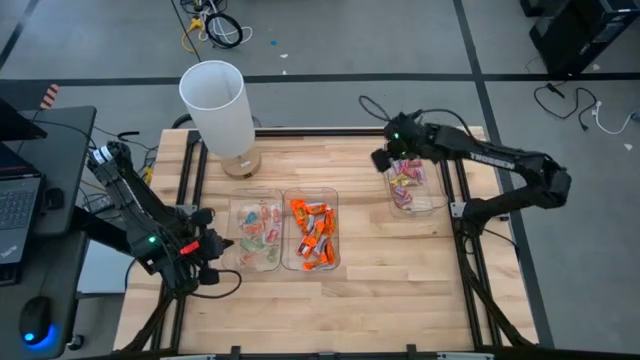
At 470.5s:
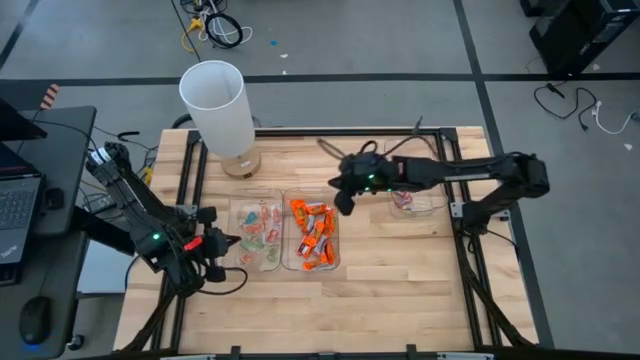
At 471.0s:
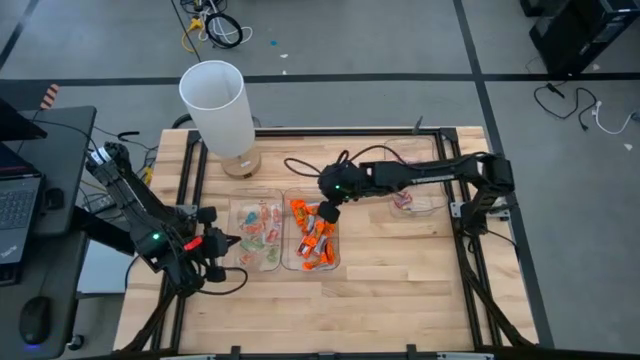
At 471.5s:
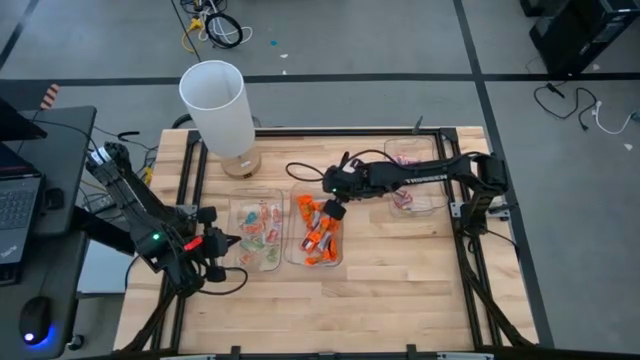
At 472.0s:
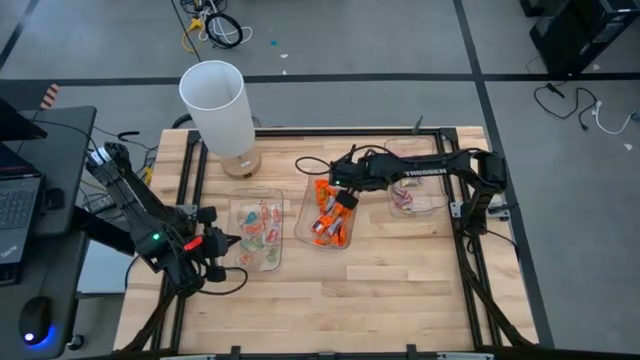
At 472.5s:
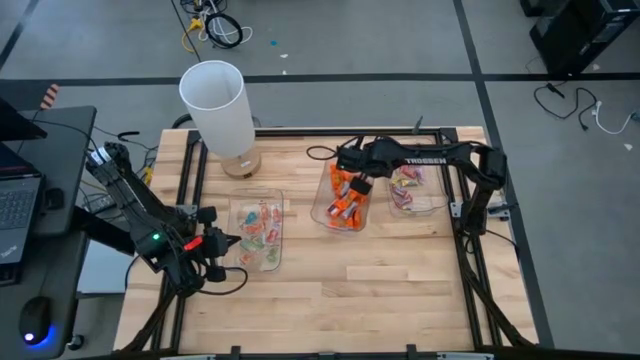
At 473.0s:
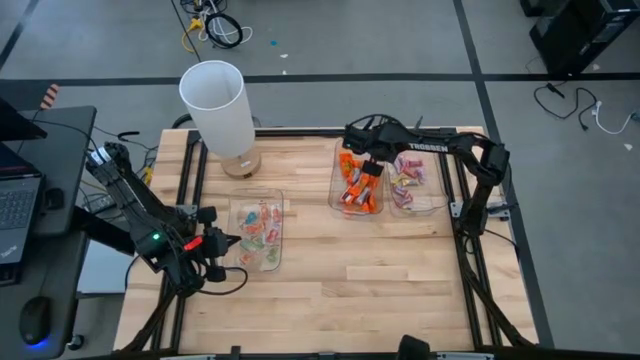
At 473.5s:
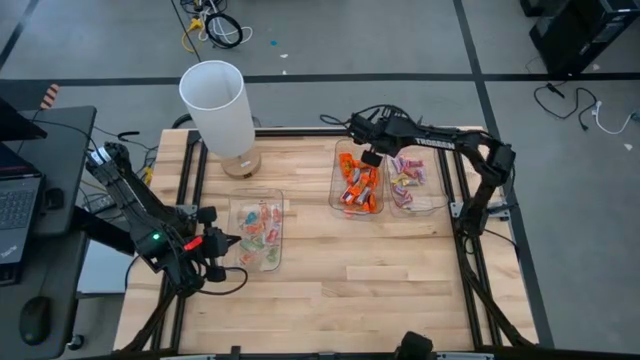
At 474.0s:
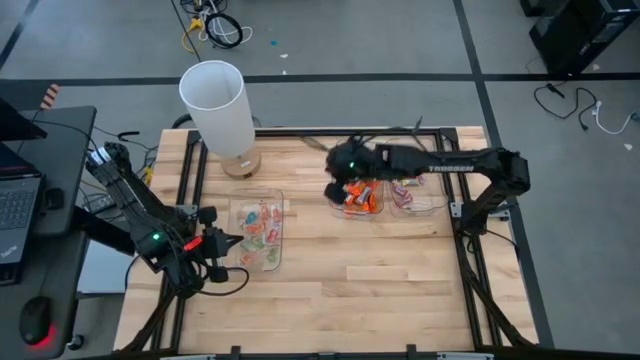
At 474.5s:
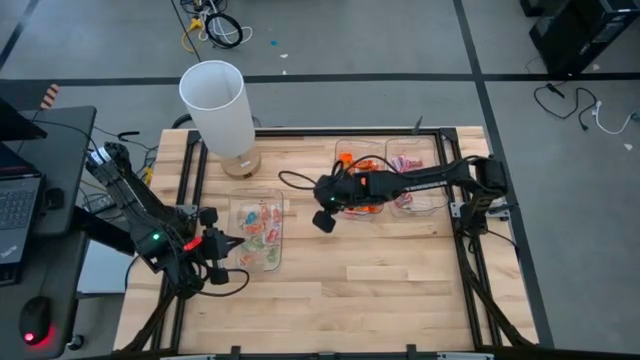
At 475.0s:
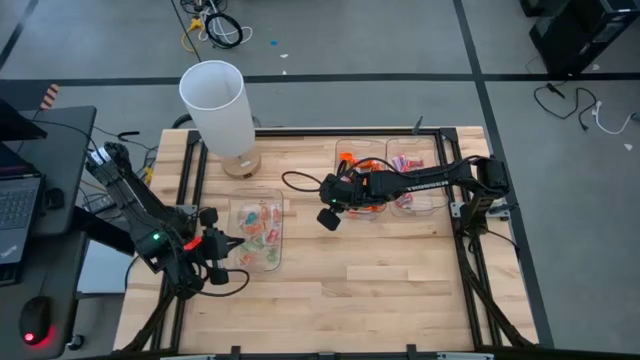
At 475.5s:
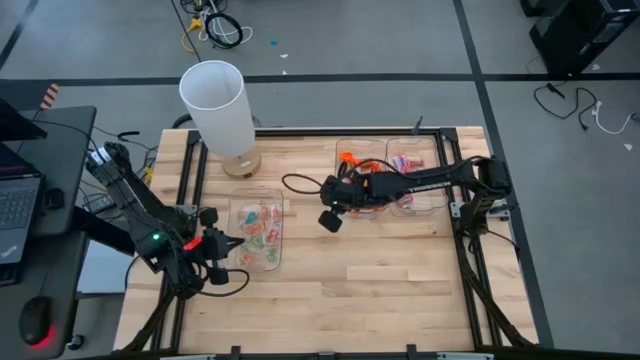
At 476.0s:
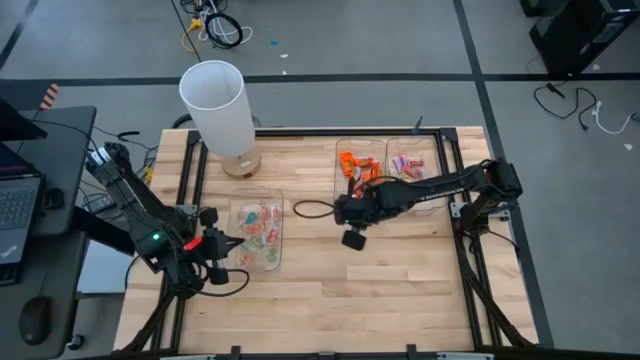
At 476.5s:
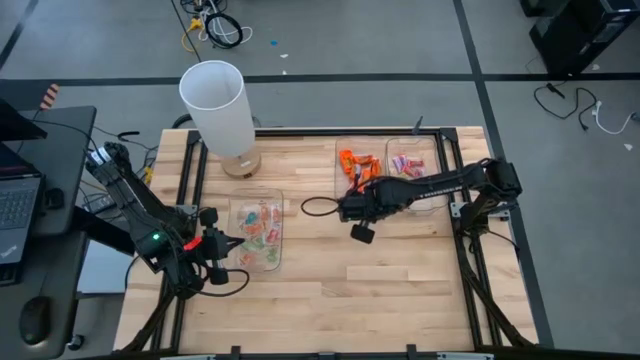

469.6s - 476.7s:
Task: Sort candy
Move the center transparent bin to the top middle of the table

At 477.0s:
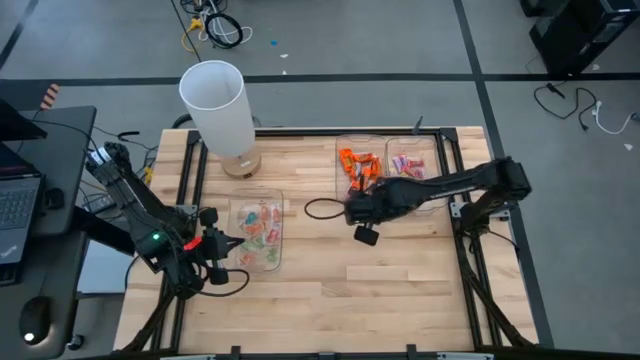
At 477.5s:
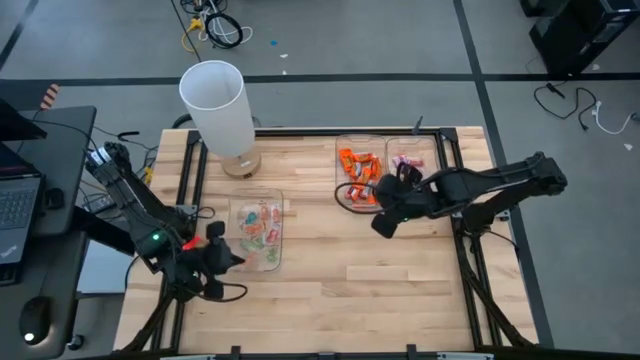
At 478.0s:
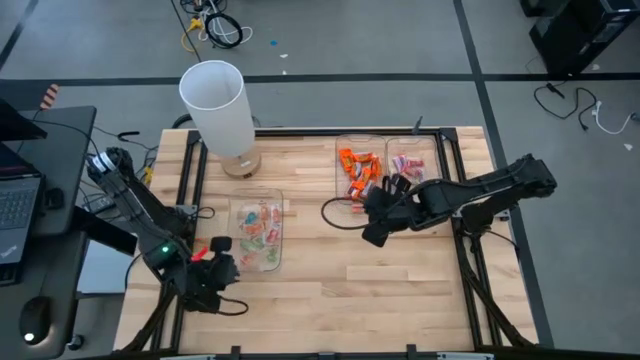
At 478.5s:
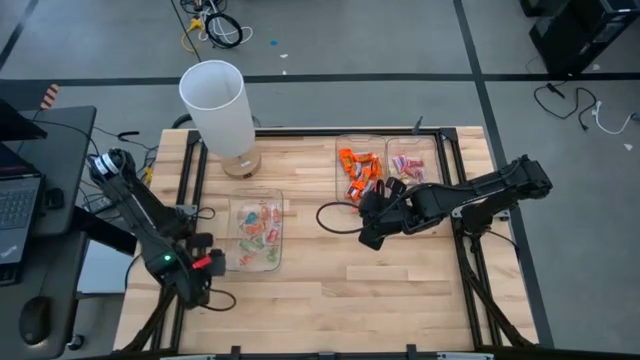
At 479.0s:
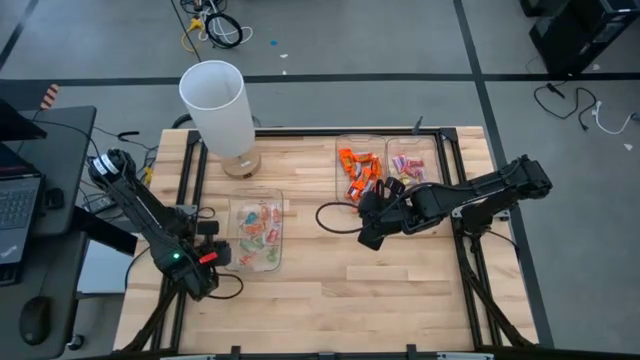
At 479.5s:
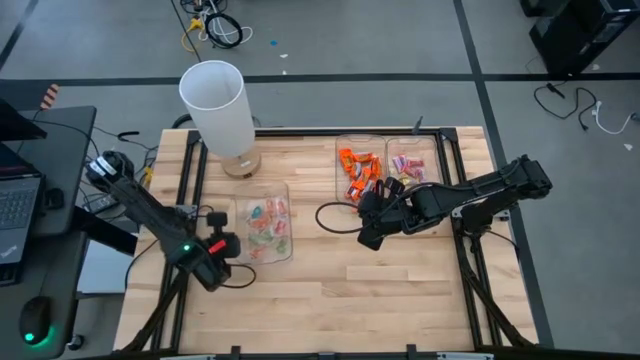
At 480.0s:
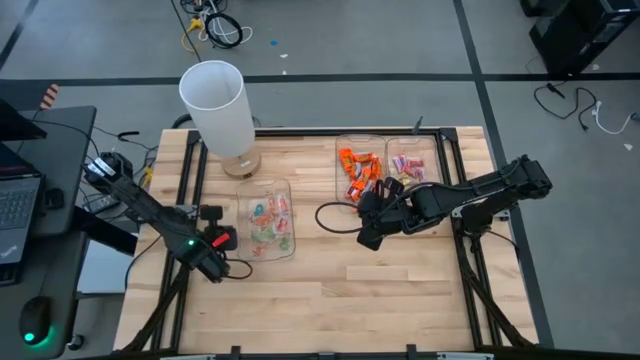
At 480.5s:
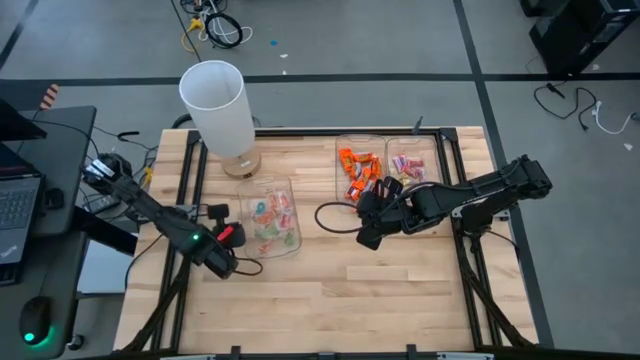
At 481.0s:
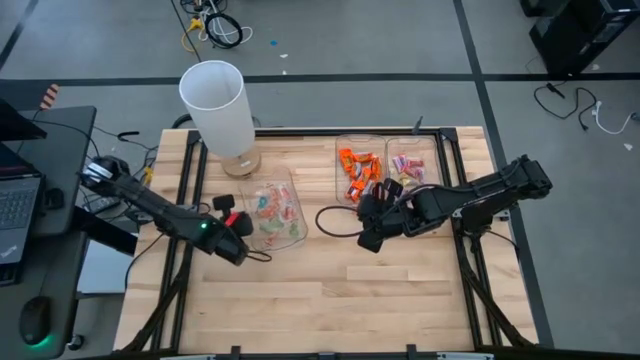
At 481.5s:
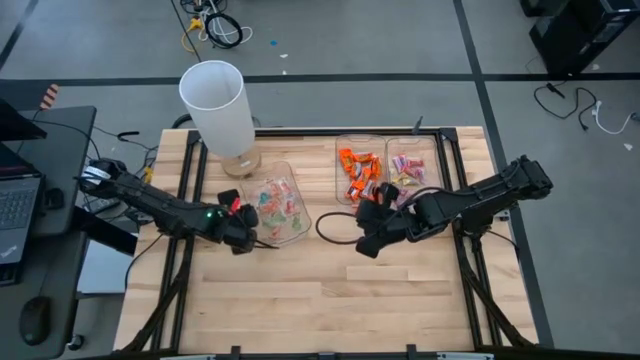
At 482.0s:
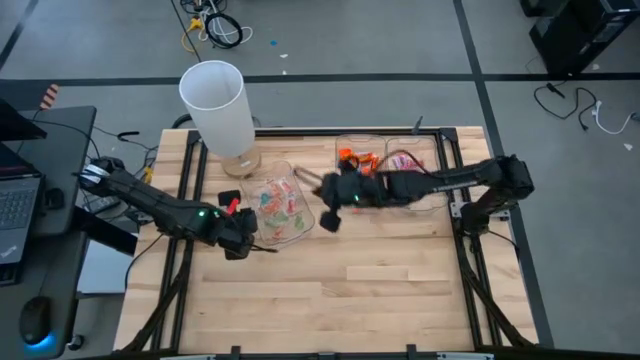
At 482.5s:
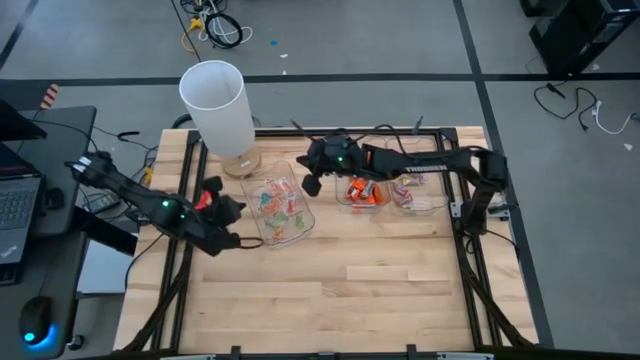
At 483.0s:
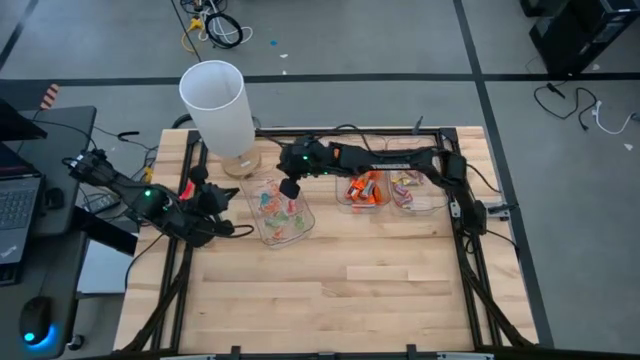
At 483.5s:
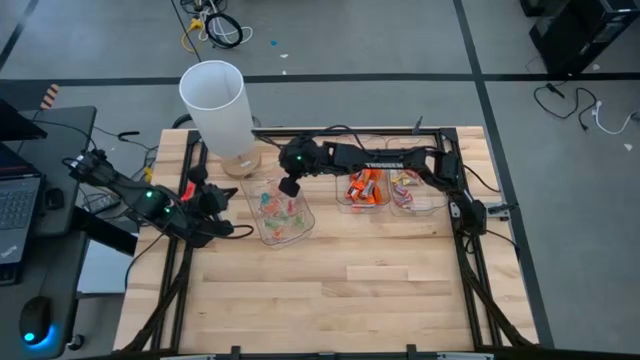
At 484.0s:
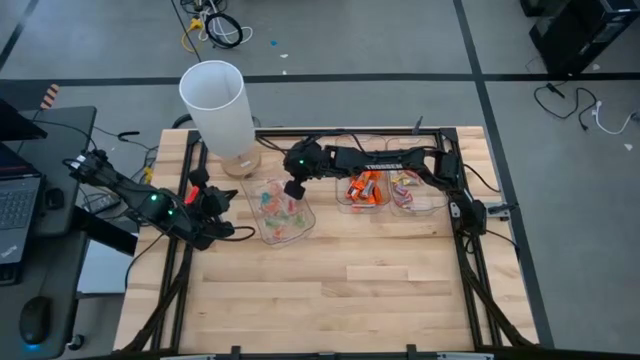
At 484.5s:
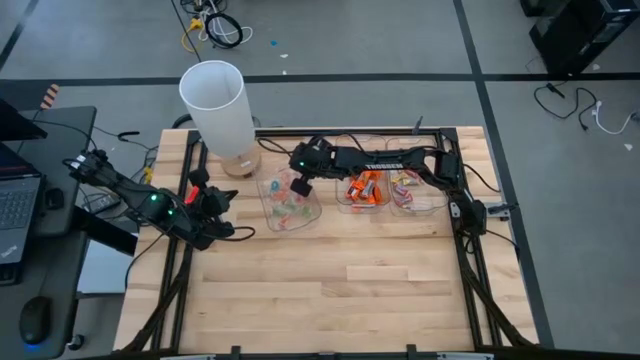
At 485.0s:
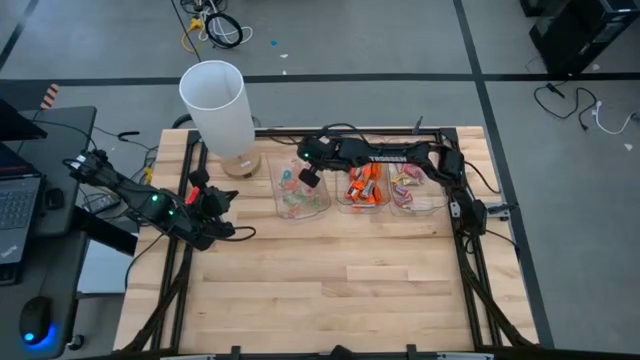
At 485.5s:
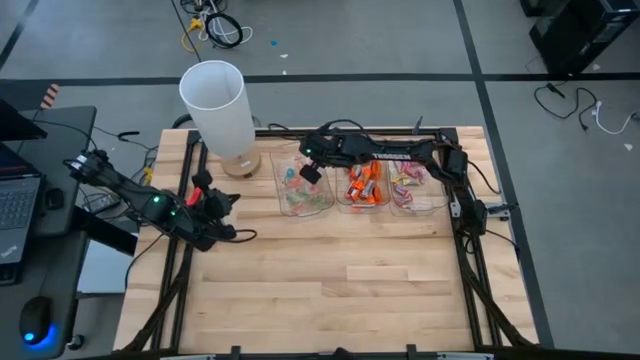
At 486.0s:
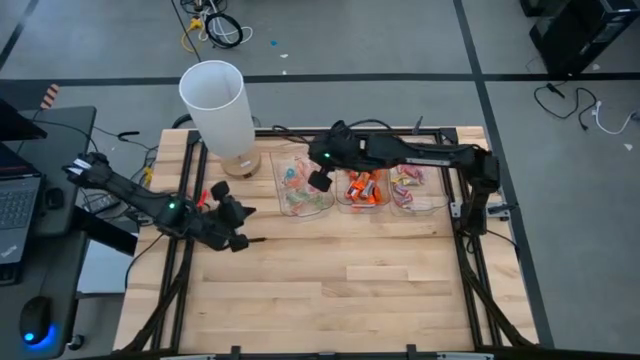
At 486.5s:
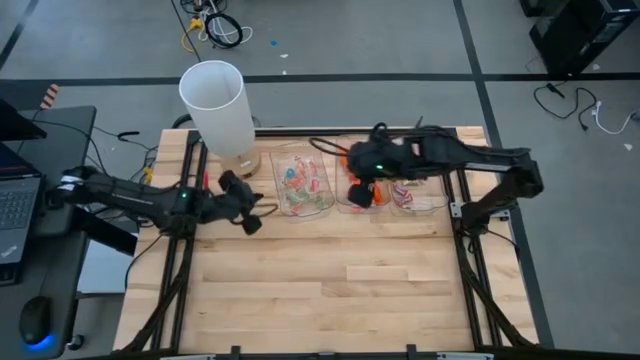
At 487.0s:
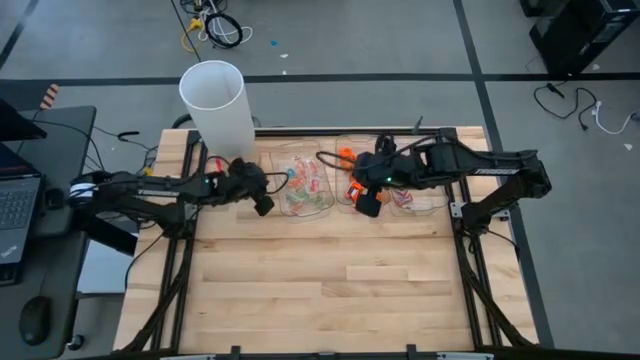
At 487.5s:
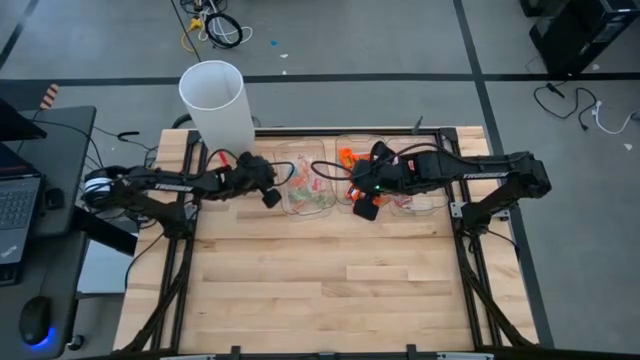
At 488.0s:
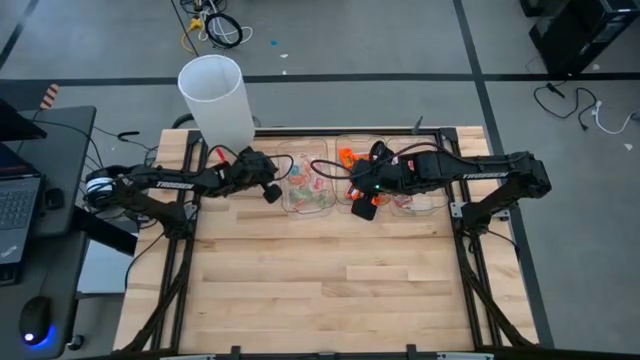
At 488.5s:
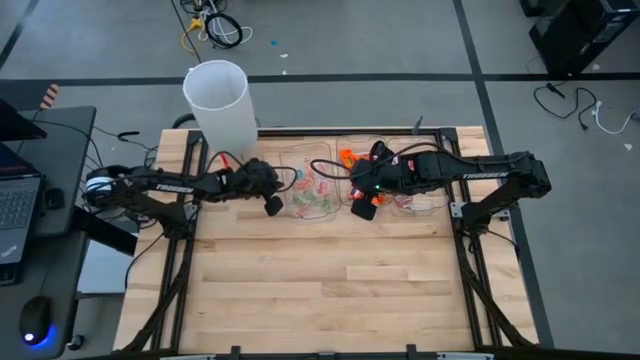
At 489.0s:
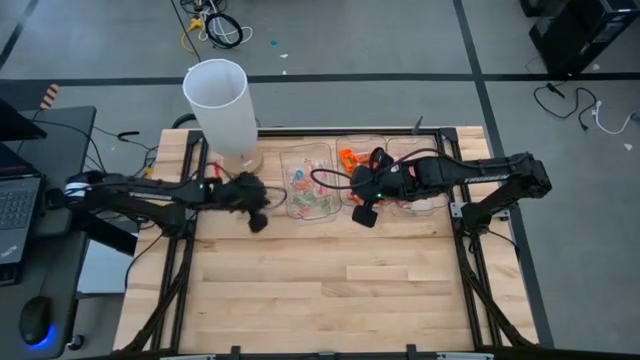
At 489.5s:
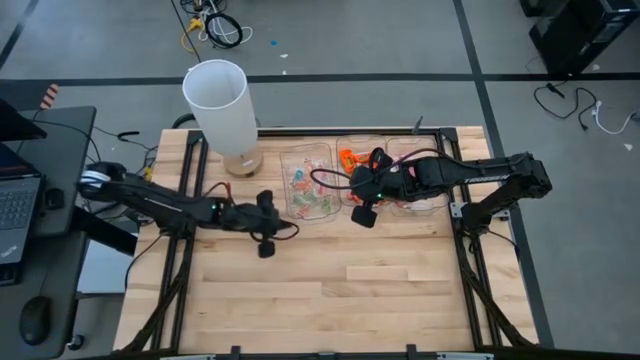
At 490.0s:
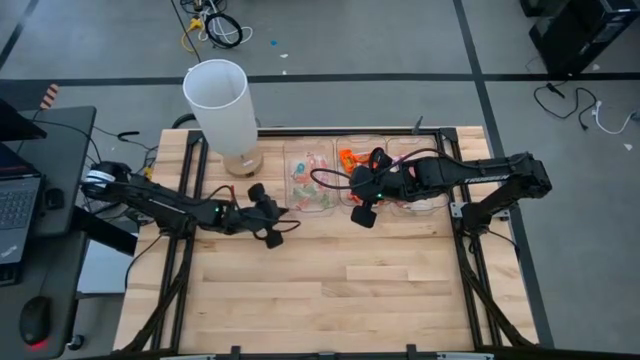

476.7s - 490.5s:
Move the middle left transparent bin to the top left of the table

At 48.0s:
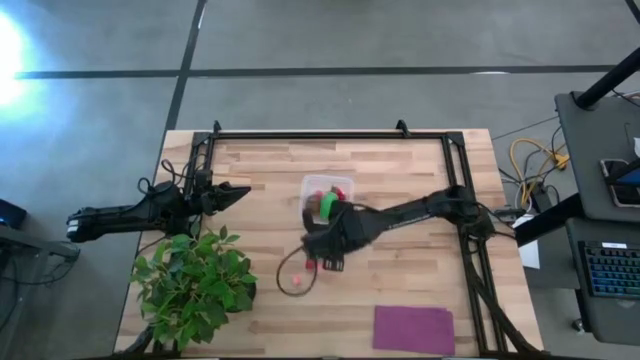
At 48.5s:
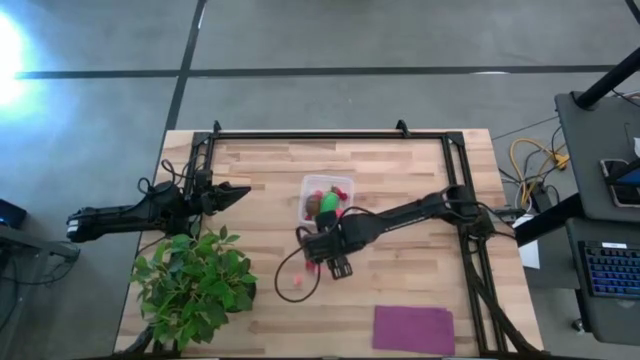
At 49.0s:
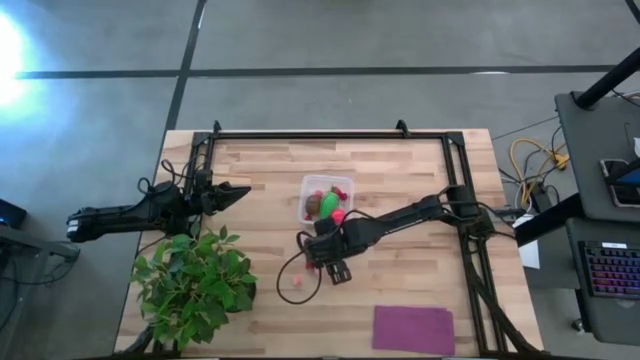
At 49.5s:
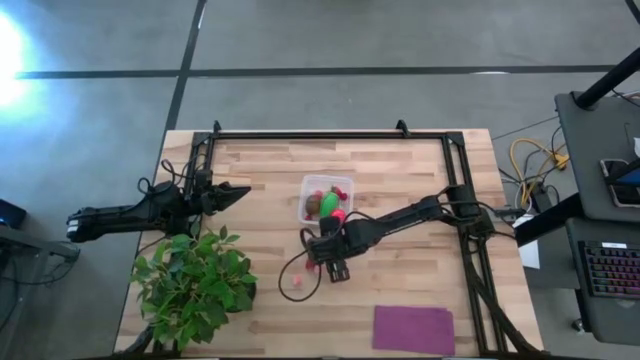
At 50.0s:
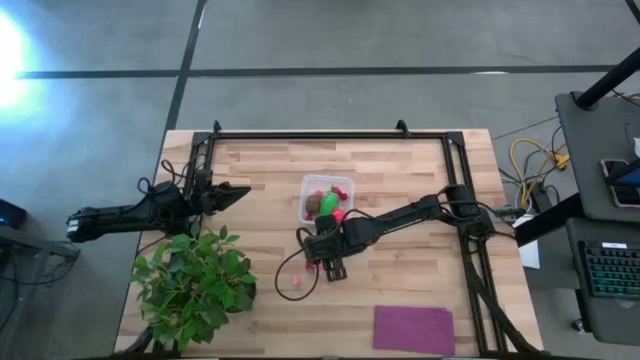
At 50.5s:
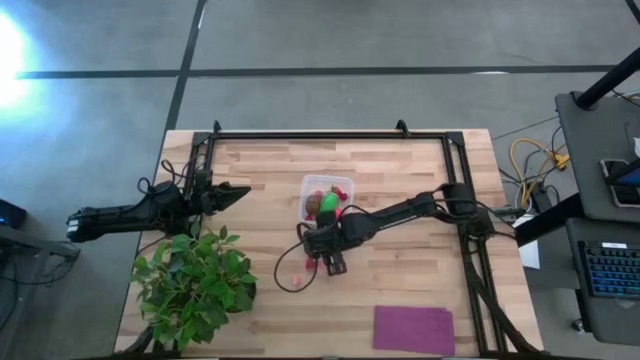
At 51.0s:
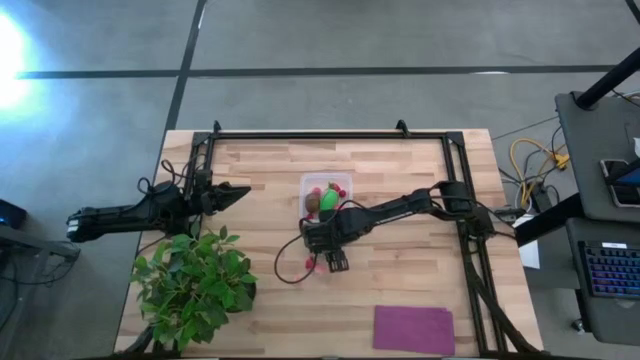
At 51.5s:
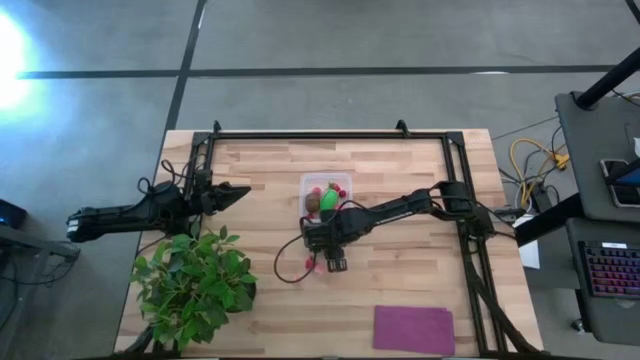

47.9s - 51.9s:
Task: Pick and placing Produce into tupperware
Put the green peas into the transparent bin
